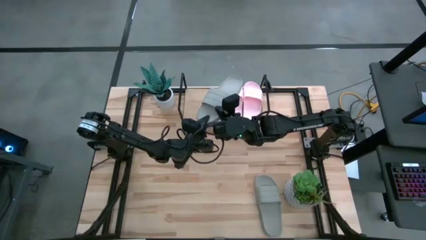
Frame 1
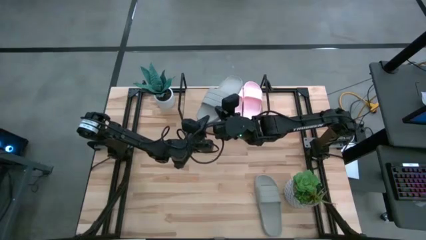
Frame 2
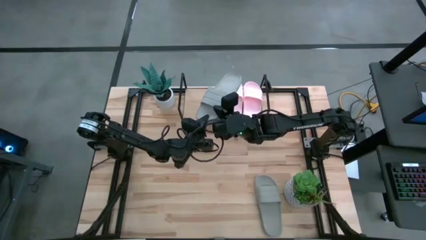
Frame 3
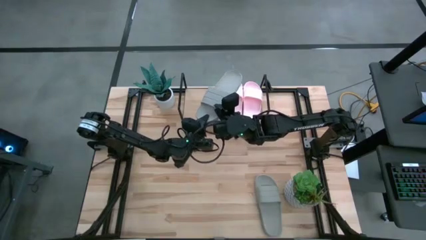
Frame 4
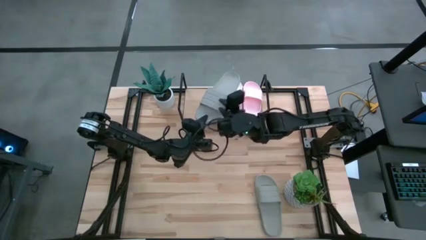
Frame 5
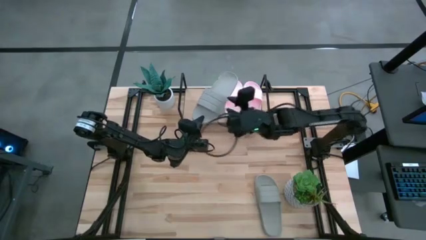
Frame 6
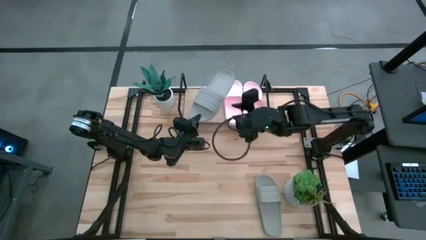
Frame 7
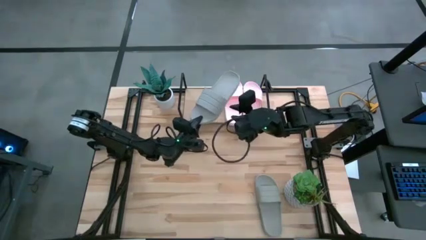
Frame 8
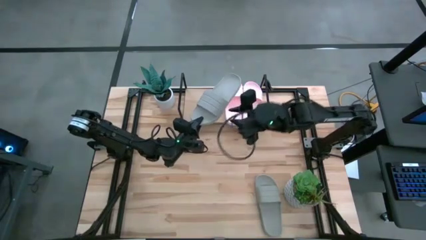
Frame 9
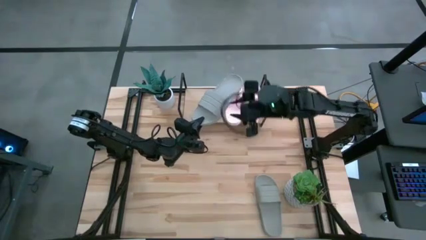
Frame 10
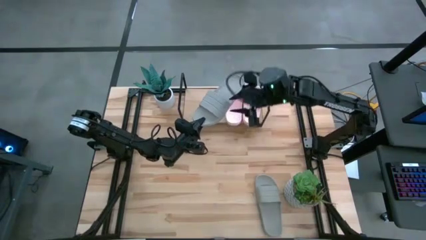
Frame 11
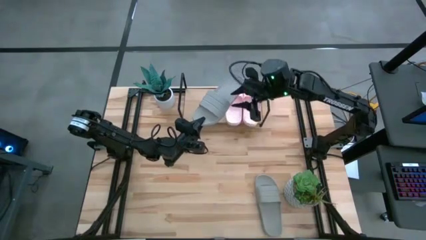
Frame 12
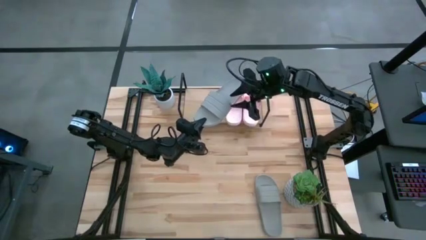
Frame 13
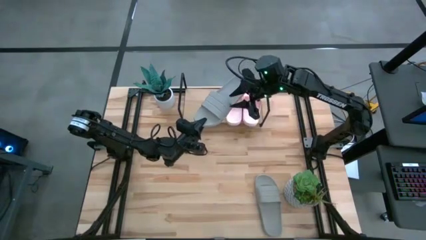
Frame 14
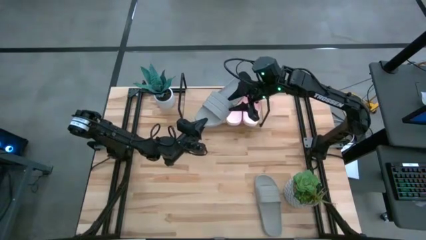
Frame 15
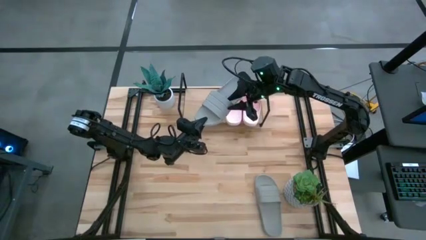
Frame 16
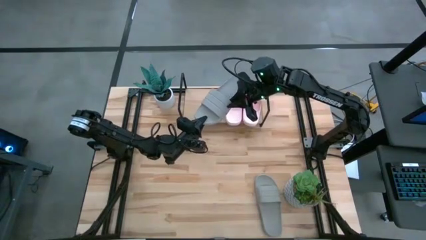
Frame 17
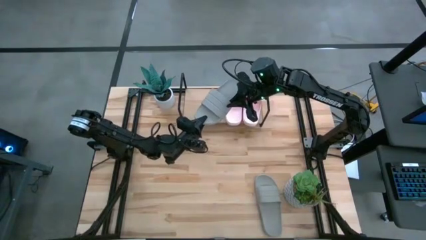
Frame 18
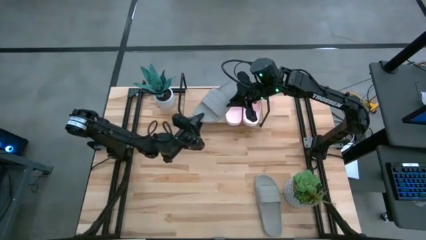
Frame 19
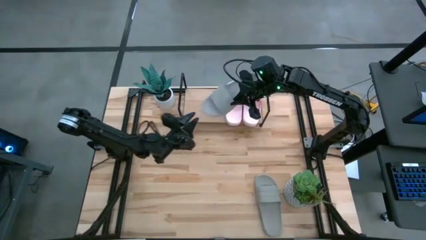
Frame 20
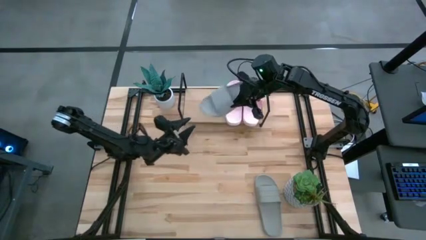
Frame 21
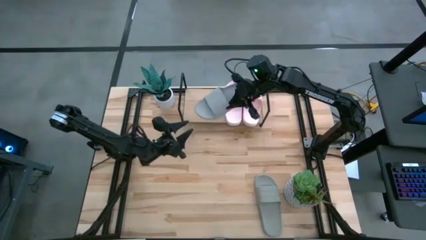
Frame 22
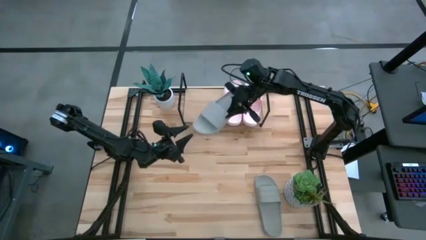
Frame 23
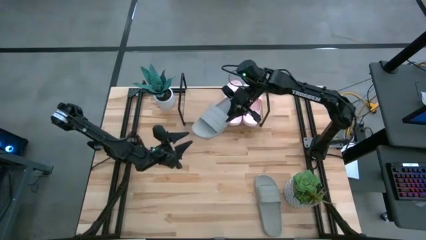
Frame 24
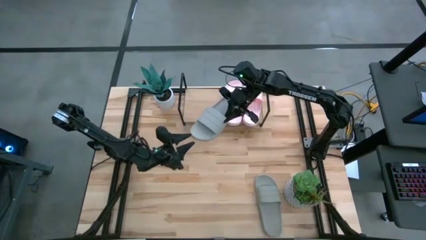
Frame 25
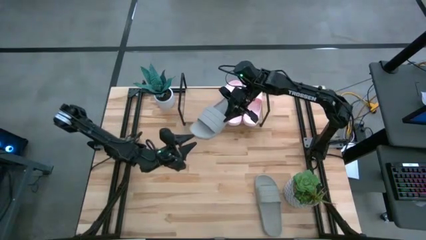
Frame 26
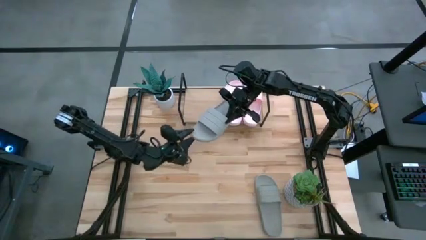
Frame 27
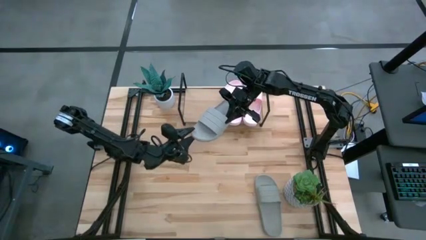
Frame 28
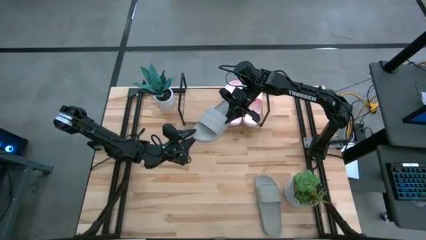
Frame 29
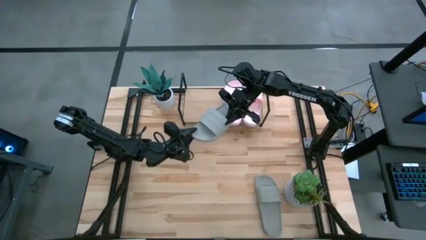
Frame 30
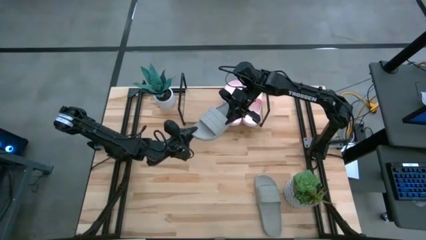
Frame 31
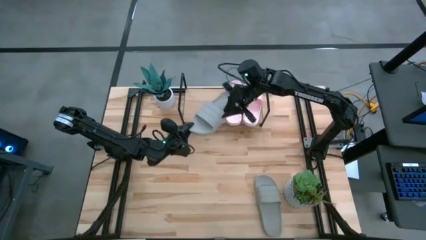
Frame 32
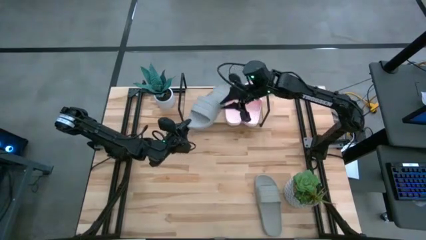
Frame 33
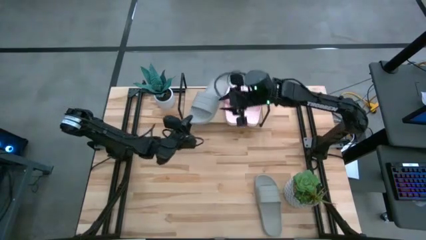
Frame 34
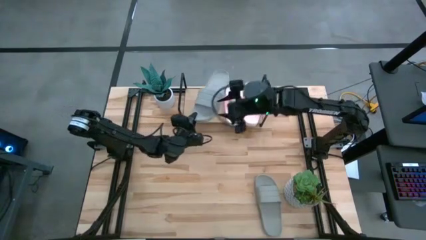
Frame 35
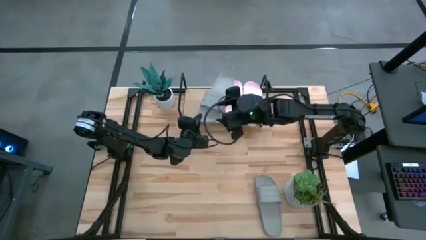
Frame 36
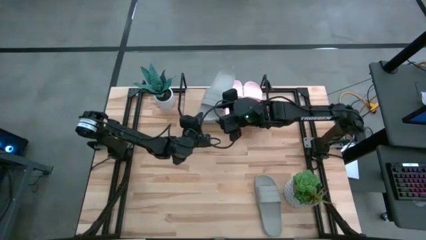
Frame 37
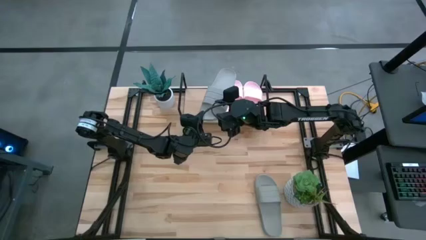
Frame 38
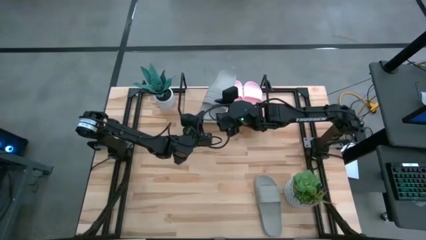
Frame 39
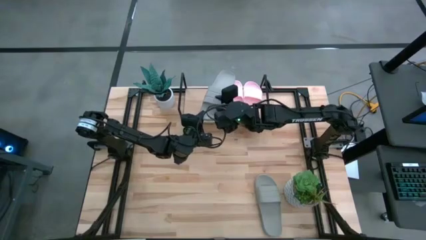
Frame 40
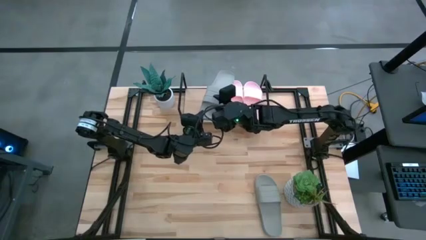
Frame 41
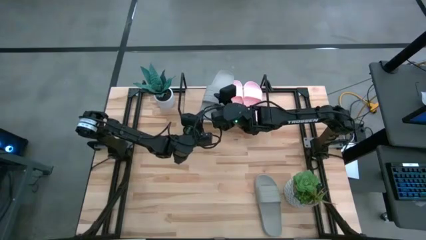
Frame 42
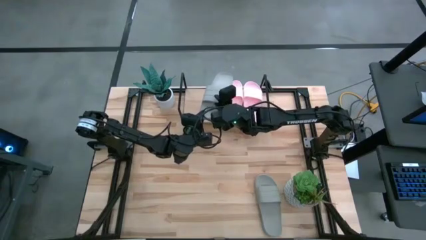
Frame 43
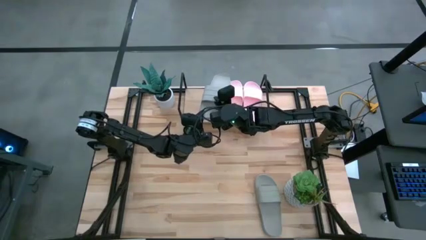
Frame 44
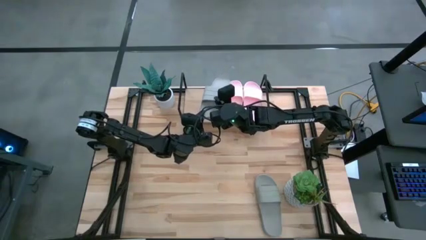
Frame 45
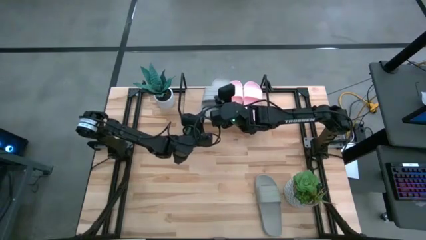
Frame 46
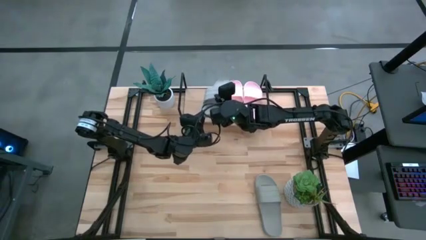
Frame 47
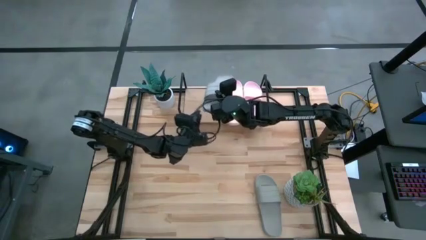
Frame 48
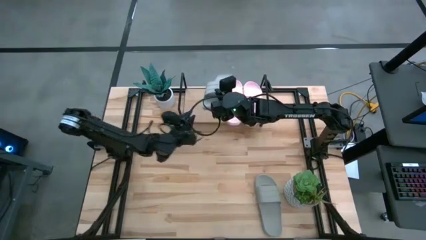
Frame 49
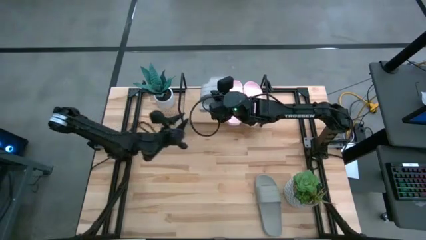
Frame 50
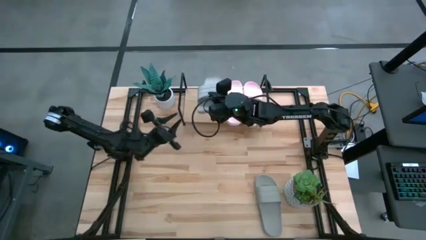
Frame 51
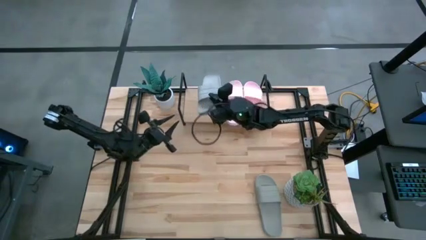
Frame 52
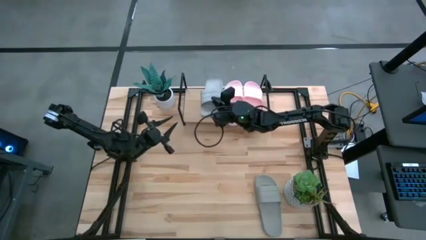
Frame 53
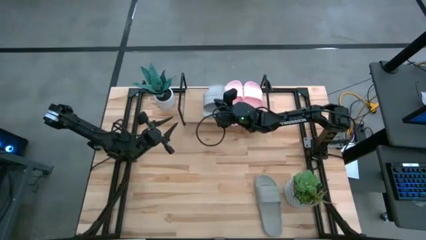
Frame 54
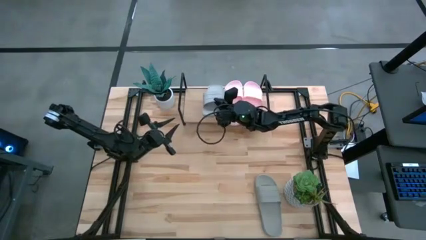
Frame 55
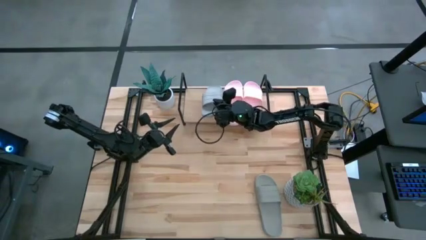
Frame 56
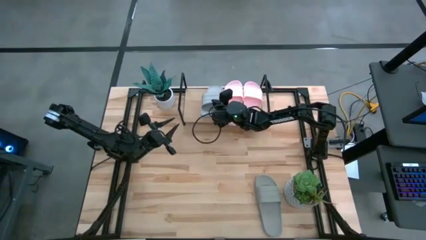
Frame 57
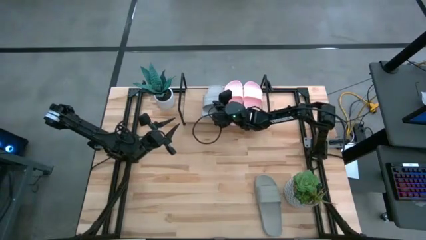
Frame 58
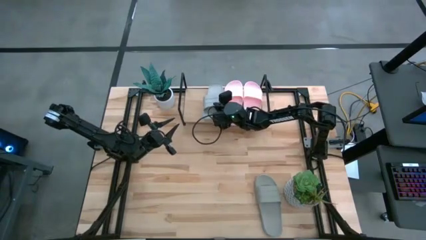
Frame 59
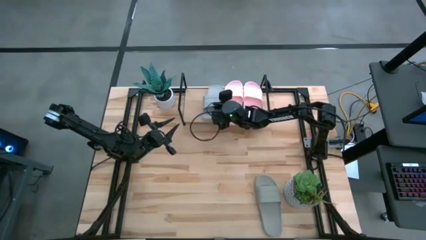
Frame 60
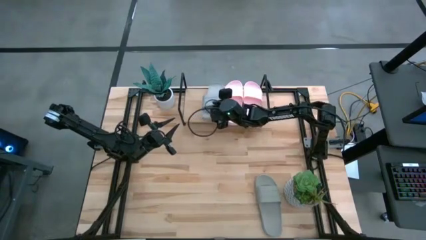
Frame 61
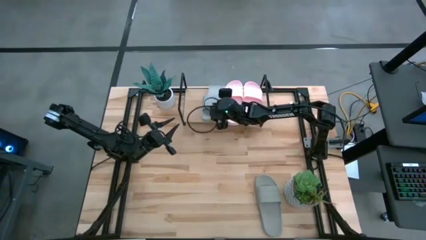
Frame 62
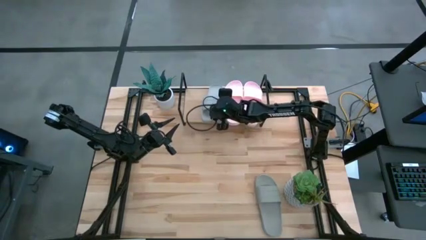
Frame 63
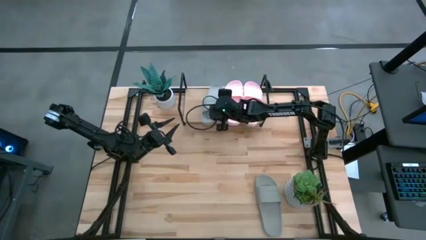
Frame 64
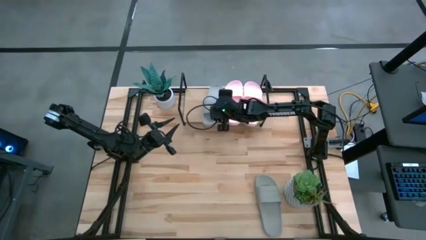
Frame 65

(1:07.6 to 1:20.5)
Task: Pick and place slides into the shelf
Put the top gray slide on the shelf

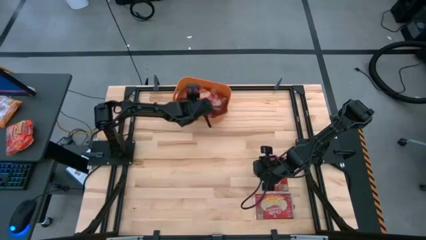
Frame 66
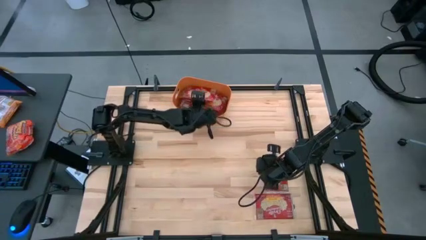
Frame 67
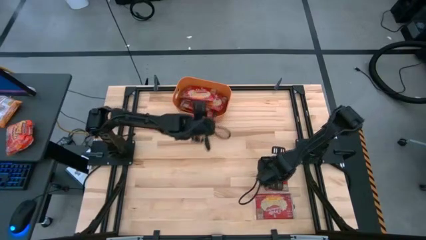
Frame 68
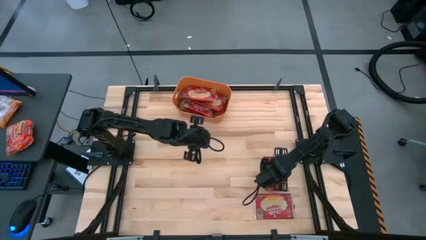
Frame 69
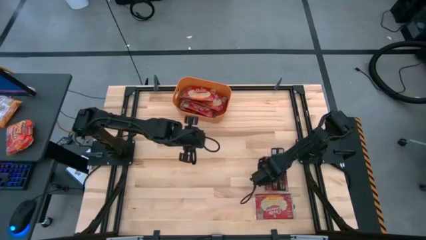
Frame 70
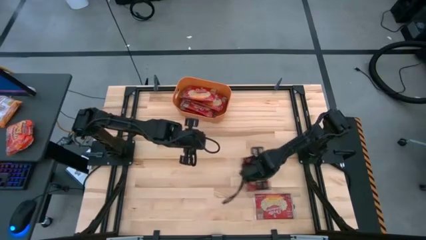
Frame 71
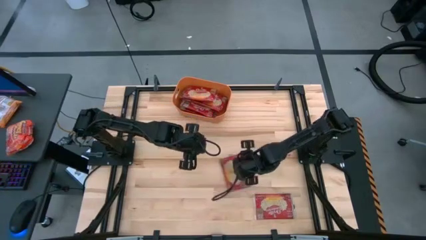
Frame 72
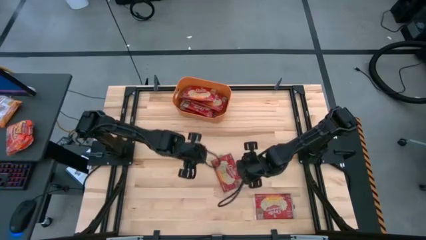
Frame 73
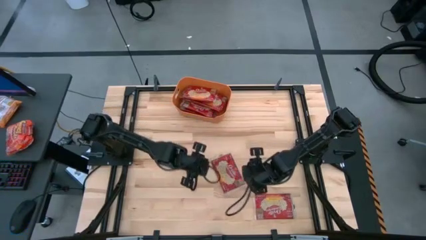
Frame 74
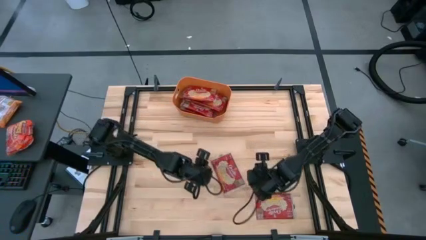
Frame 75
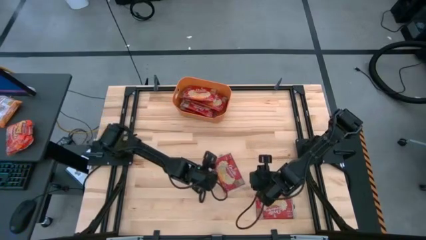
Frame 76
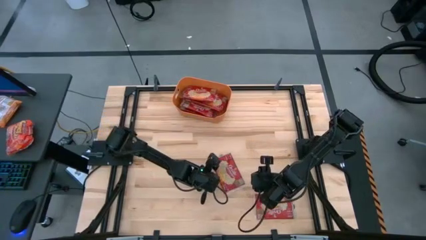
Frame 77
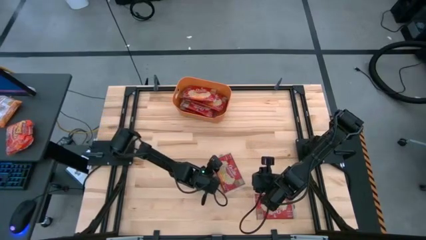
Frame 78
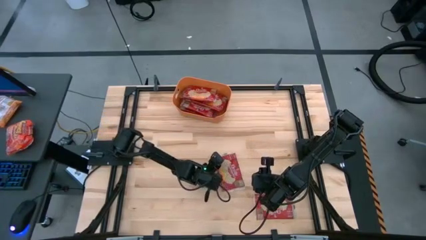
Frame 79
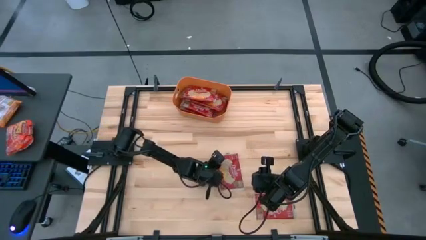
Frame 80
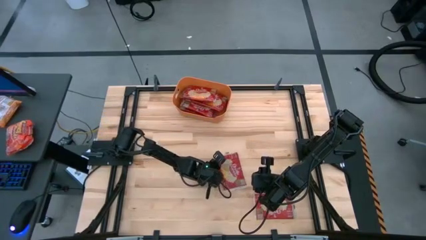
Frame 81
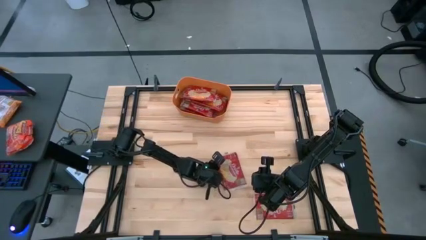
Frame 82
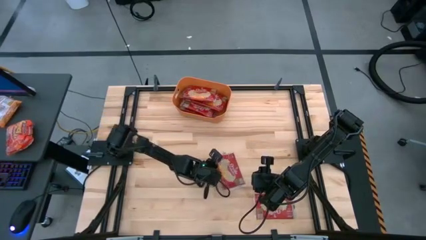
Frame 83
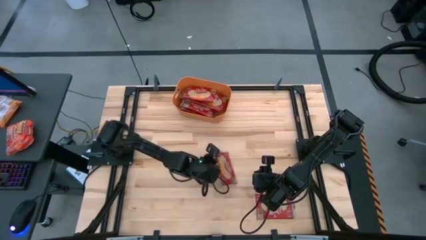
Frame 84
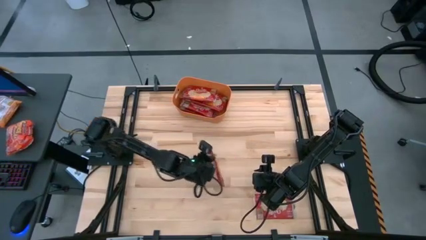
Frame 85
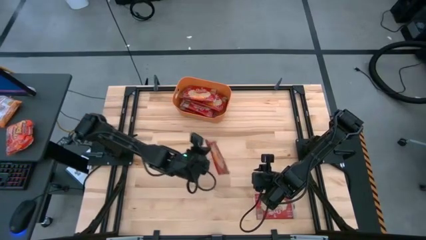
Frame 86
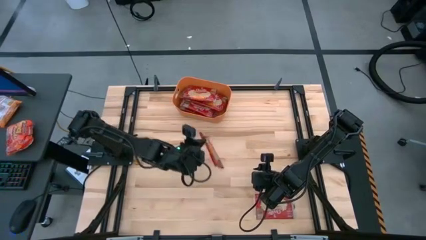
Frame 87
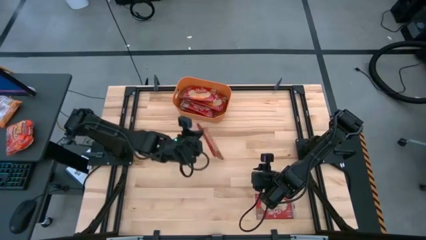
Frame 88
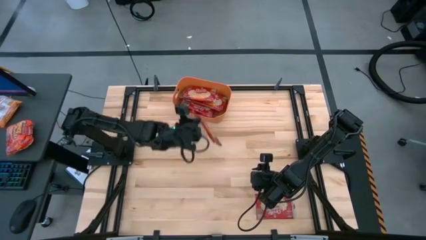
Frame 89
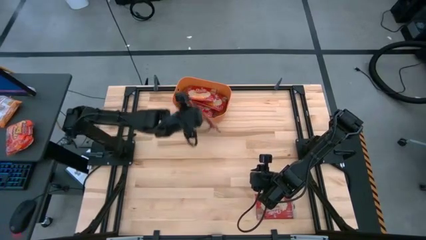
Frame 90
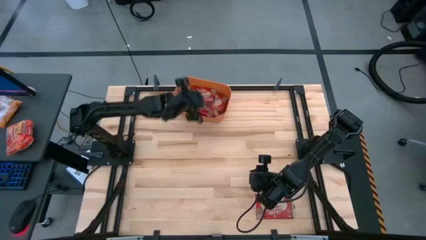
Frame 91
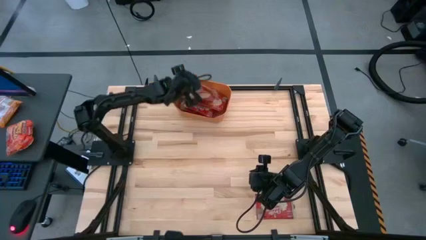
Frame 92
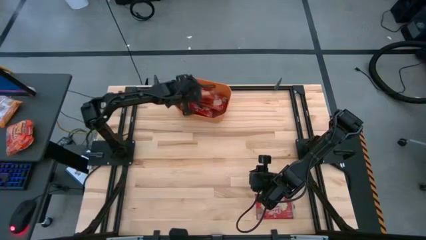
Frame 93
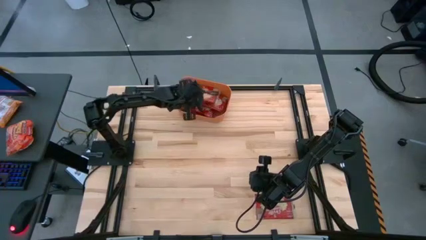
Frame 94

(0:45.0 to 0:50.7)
Task: Sort popcorn bags into baskets
Put the red popcorn bag into the orange bin
